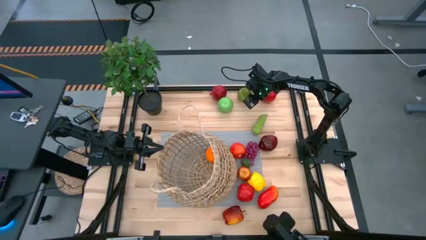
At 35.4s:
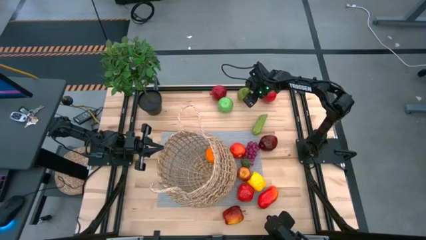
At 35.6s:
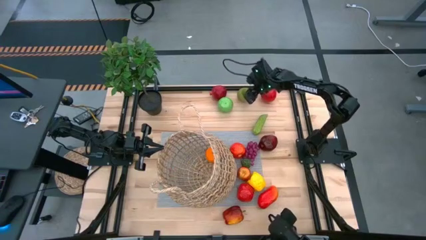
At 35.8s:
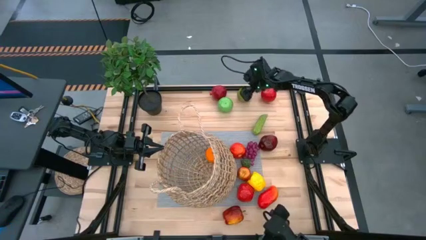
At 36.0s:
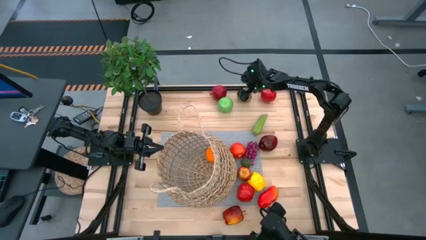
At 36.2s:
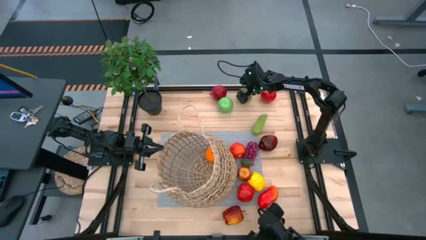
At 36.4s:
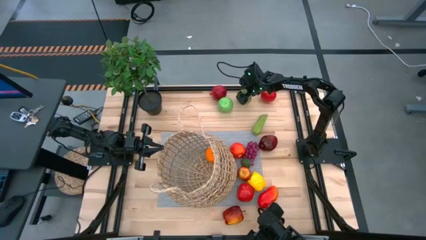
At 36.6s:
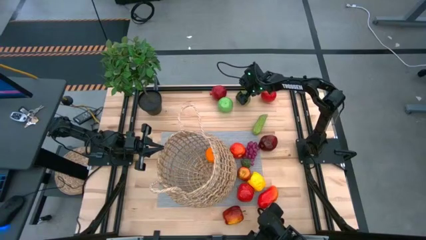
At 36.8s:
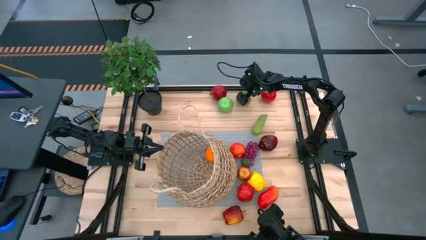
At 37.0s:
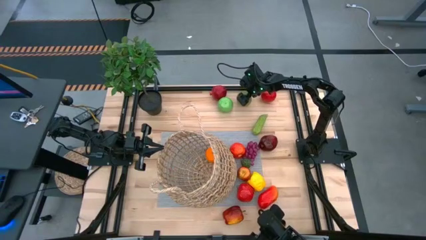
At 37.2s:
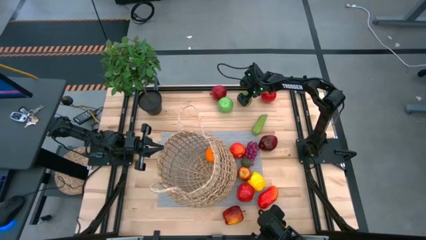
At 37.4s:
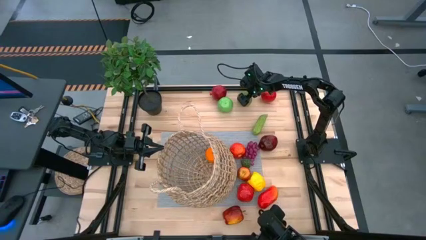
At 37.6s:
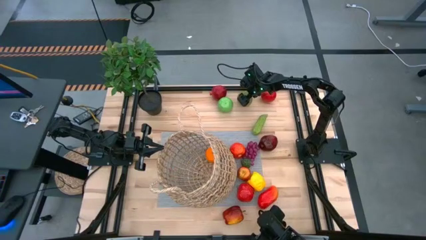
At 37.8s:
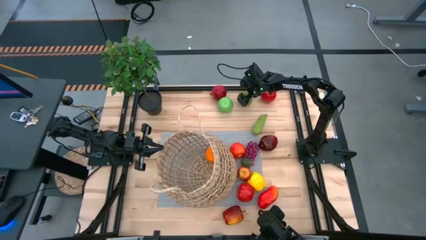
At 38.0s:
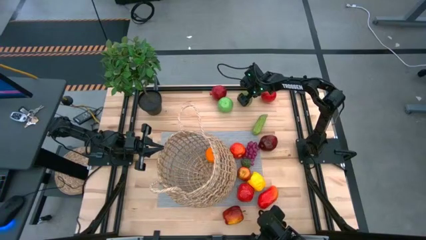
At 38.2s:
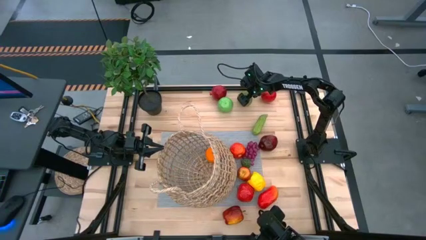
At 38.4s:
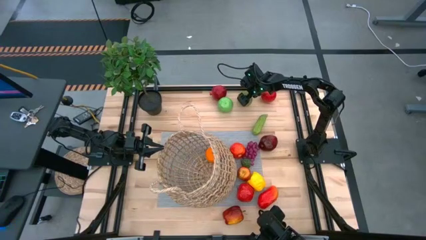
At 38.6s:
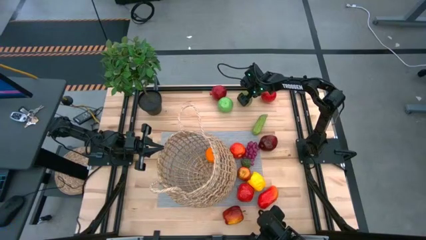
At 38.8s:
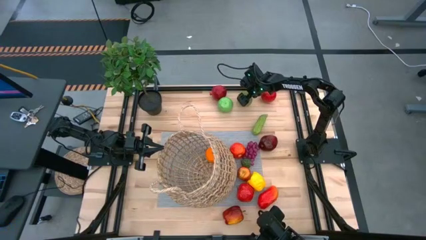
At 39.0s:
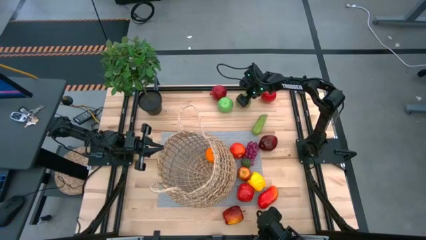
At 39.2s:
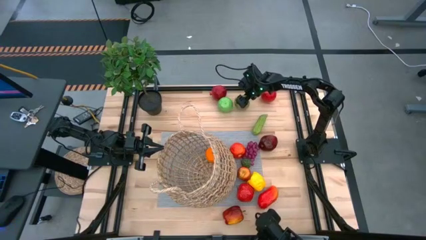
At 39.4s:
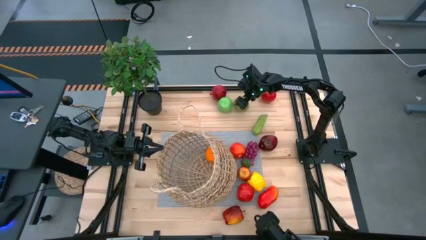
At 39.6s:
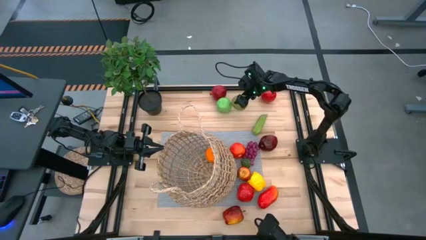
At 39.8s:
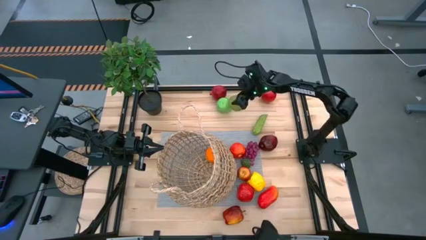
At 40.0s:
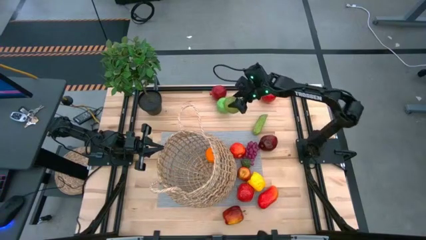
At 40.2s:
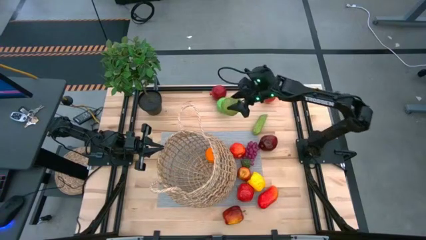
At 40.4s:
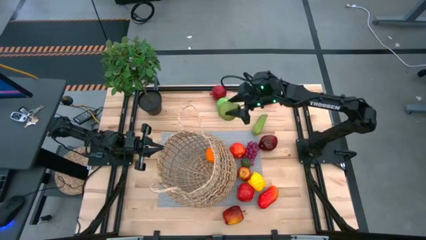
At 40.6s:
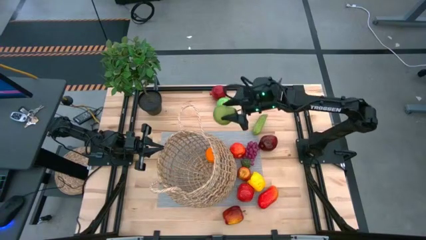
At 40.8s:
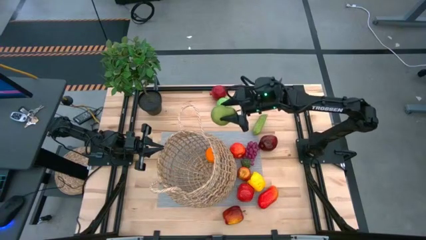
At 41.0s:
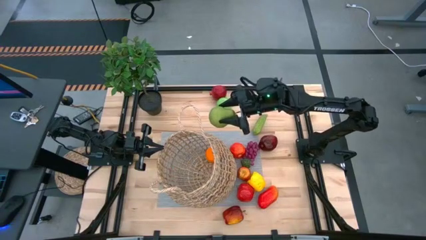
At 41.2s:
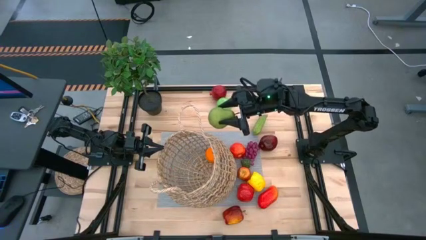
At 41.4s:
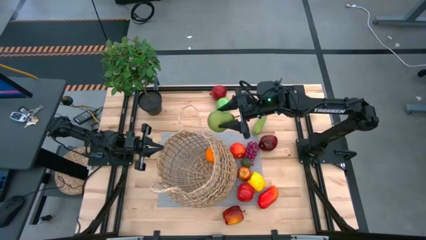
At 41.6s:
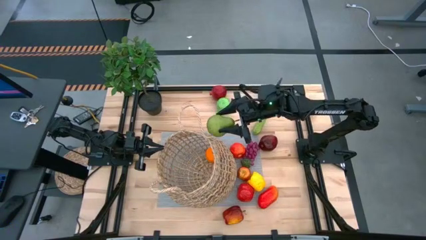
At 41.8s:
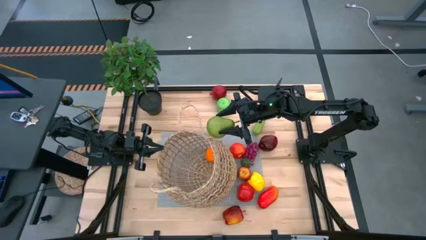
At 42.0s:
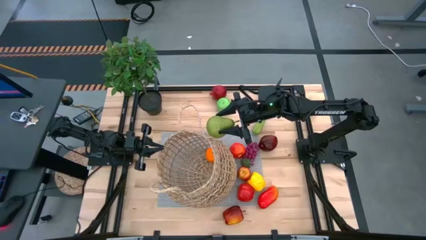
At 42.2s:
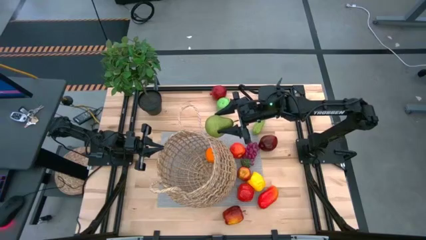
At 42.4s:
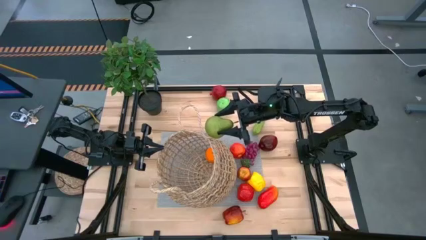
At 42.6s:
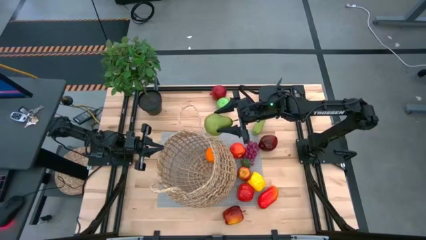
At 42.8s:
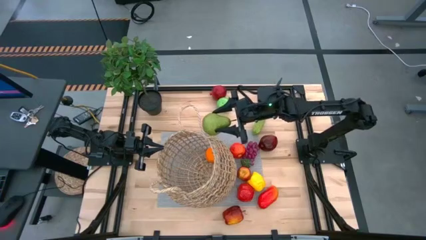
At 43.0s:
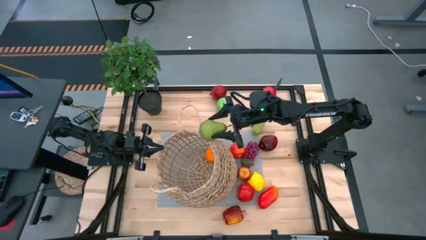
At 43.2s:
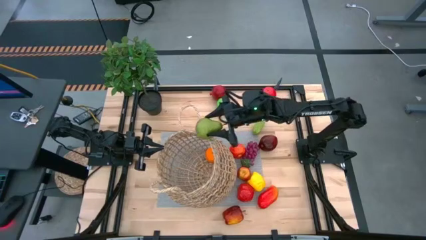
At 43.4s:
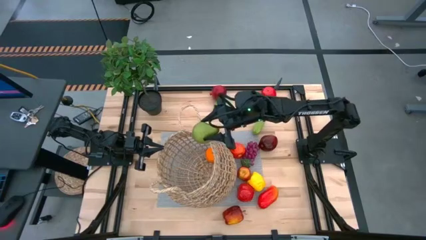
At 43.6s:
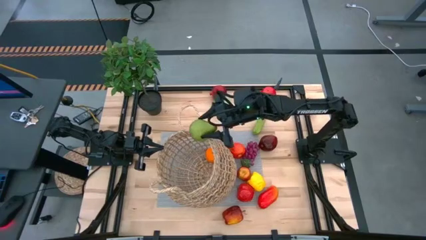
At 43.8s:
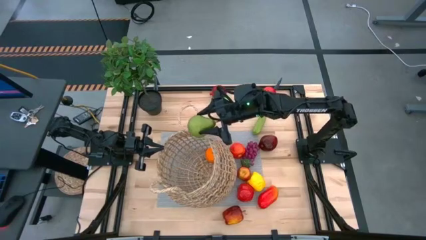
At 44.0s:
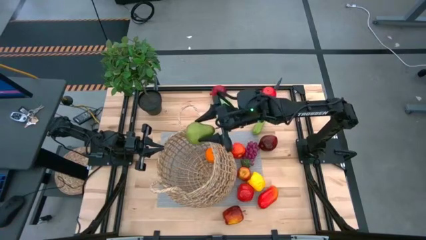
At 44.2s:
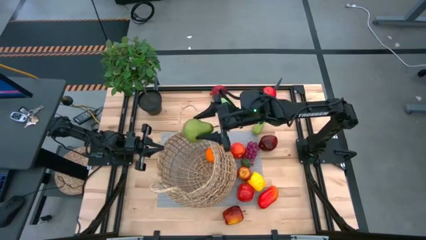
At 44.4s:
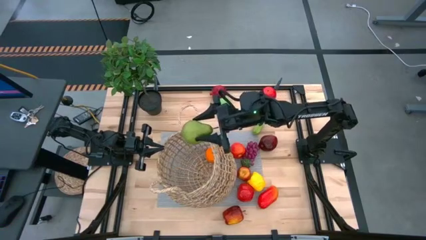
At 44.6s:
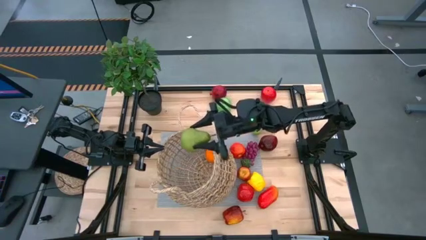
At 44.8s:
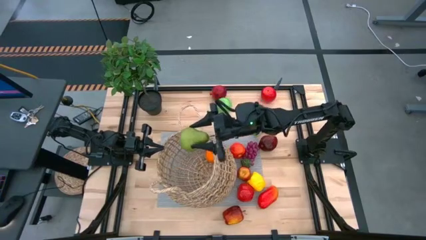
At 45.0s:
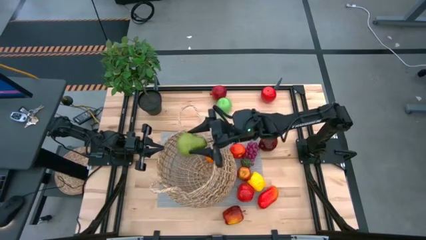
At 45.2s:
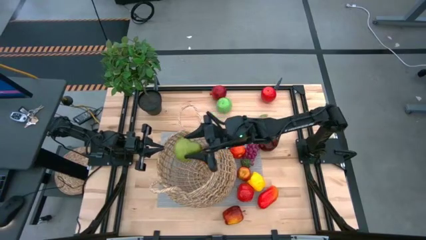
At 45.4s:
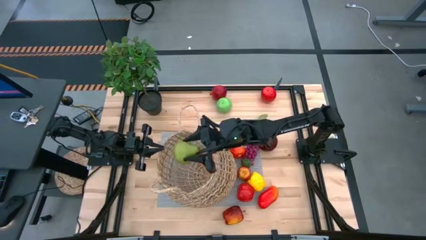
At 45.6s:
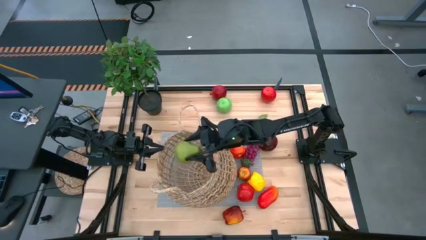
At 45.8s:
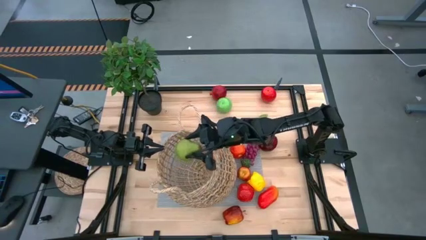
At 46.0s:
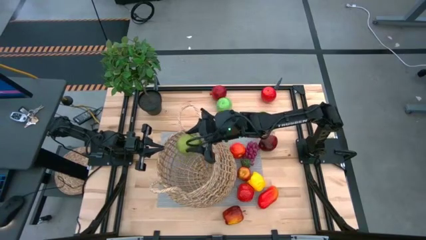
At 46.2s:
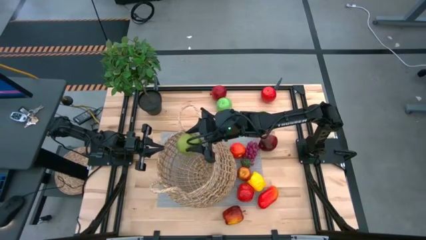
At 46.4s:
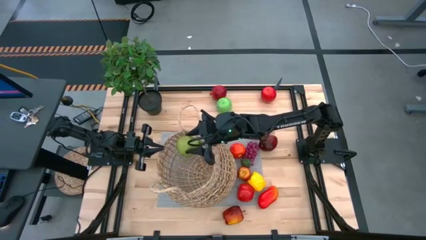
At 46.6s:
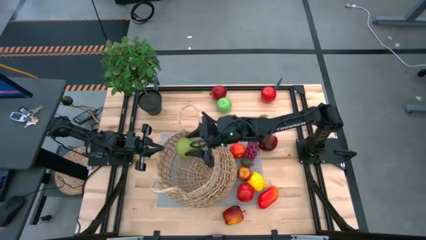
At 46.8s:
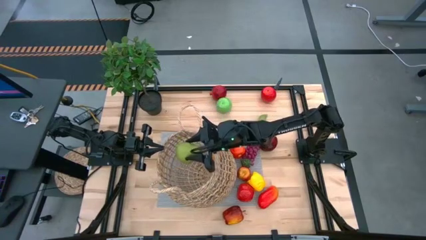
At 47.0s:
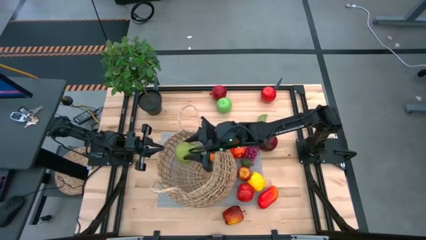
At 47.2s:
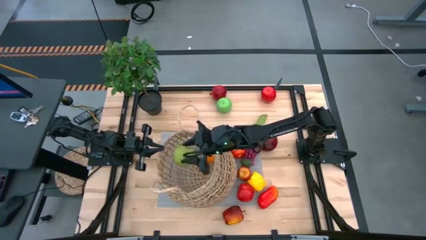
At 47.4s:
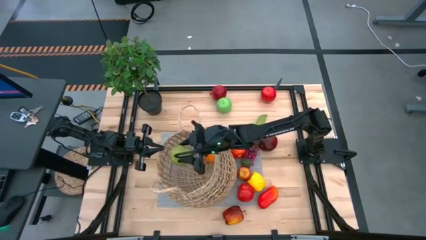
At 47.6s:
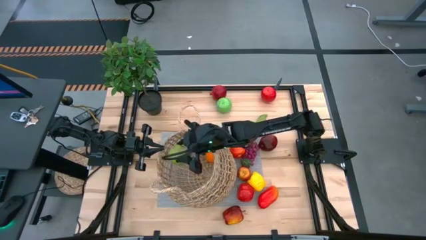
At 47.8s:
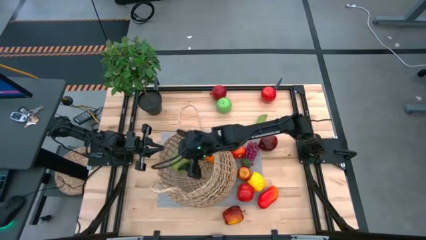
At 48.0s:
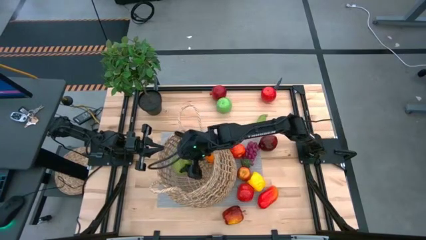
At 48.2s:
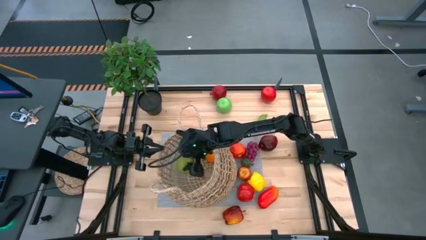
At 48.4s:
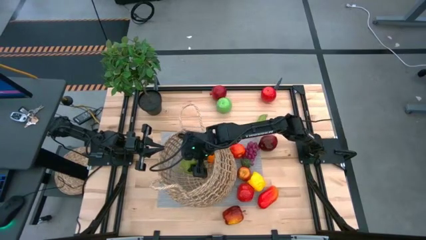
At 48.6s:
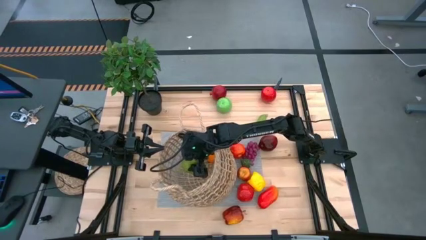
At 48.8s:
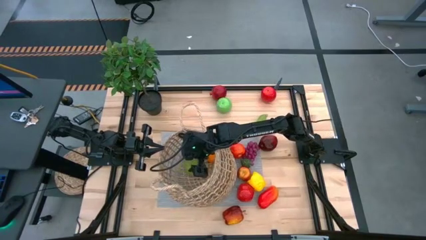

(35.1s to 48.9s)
Task: Build produce basket
Put the pear into the brown basket
